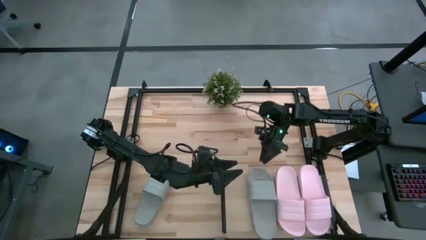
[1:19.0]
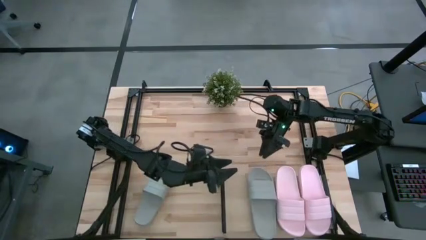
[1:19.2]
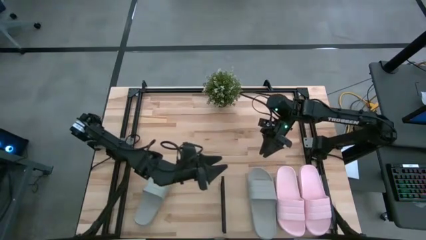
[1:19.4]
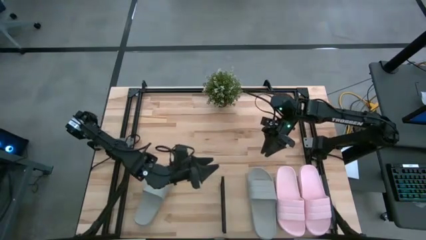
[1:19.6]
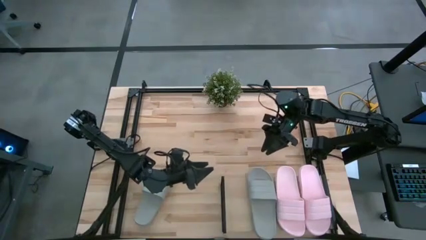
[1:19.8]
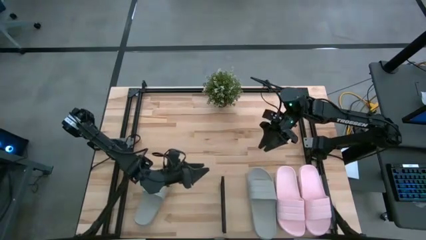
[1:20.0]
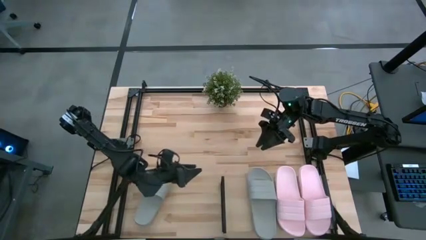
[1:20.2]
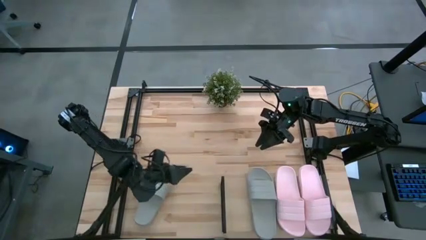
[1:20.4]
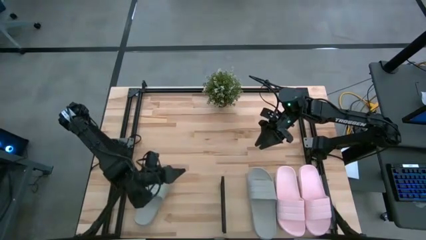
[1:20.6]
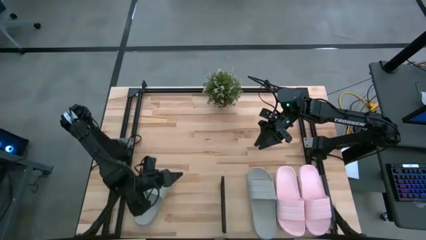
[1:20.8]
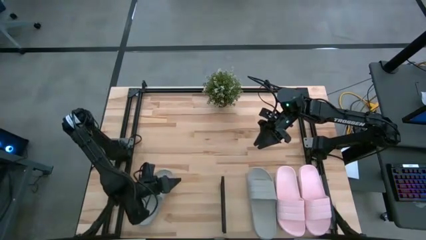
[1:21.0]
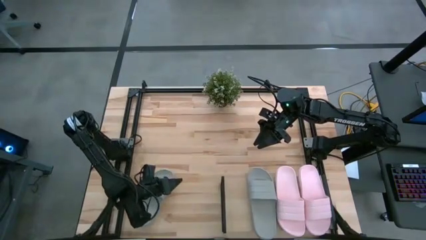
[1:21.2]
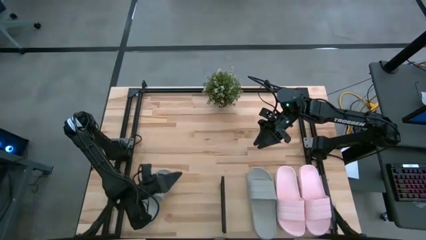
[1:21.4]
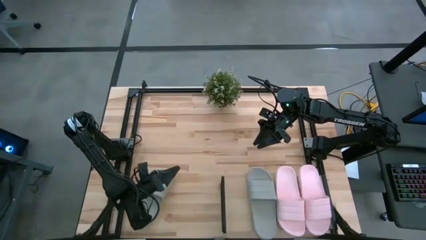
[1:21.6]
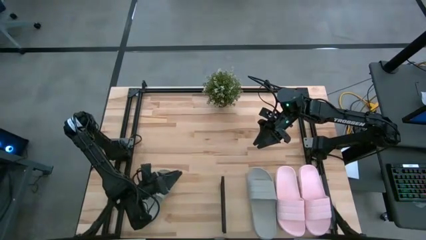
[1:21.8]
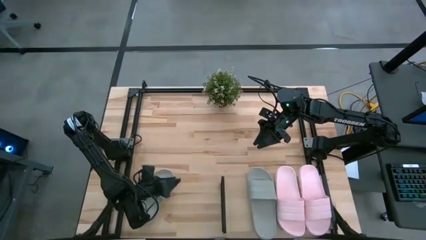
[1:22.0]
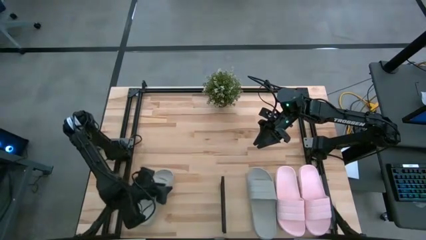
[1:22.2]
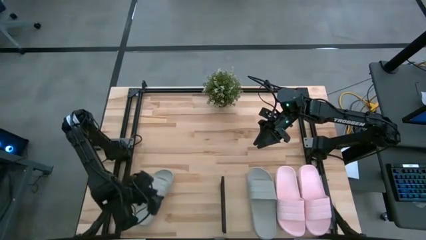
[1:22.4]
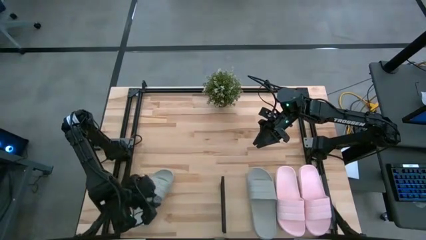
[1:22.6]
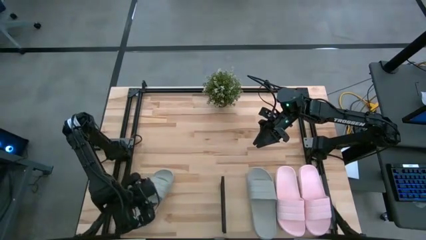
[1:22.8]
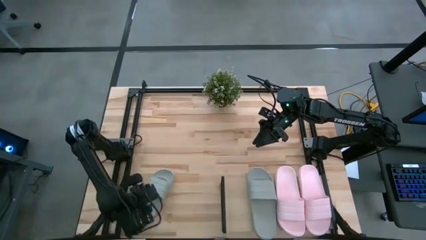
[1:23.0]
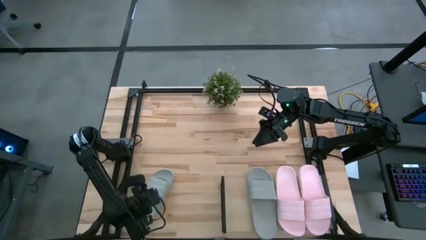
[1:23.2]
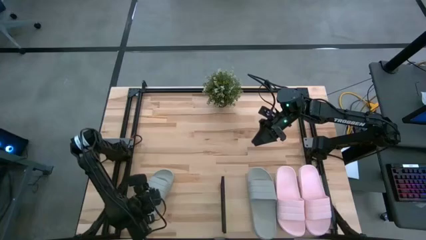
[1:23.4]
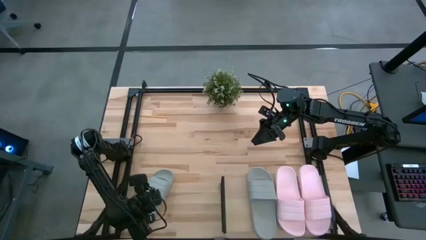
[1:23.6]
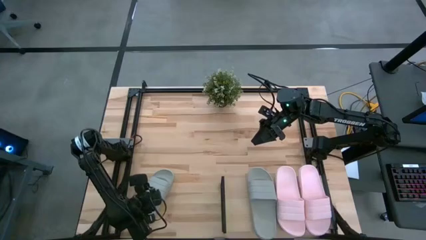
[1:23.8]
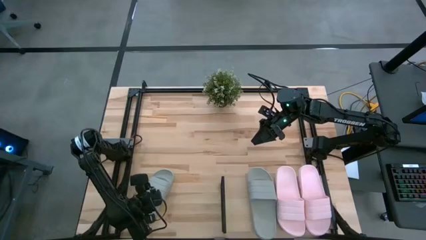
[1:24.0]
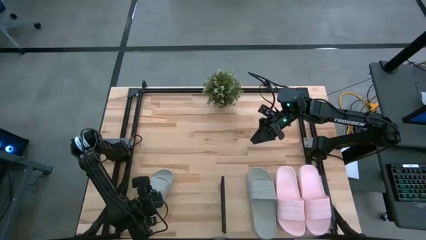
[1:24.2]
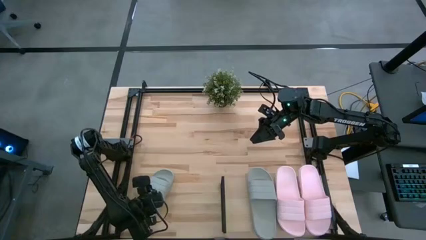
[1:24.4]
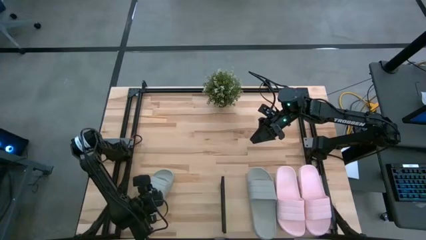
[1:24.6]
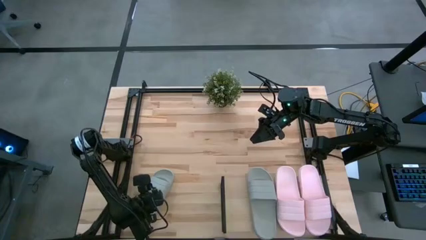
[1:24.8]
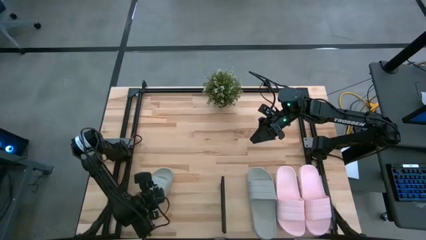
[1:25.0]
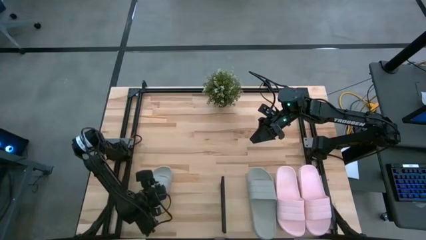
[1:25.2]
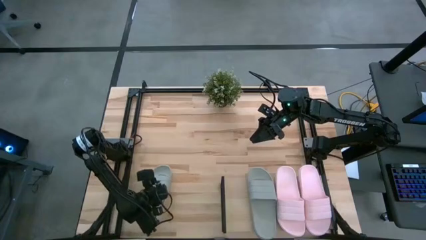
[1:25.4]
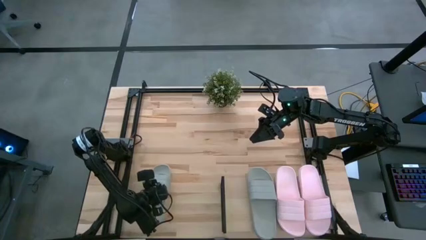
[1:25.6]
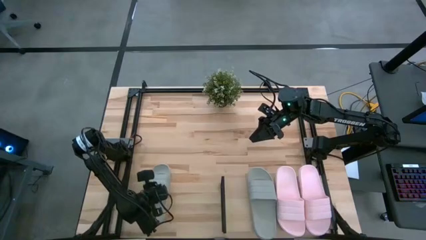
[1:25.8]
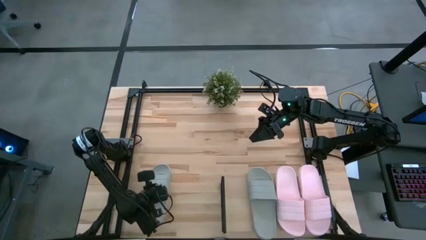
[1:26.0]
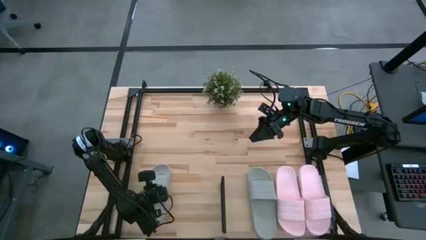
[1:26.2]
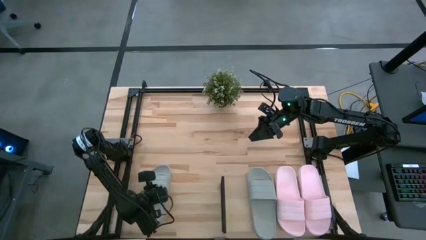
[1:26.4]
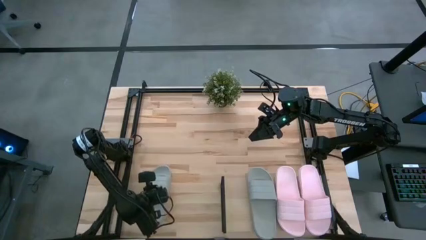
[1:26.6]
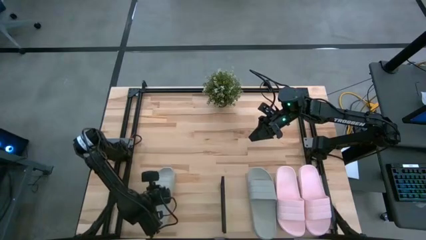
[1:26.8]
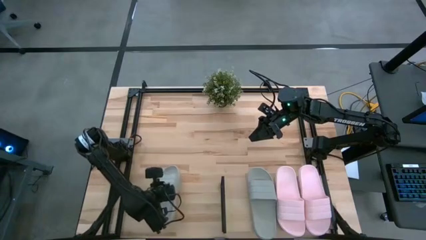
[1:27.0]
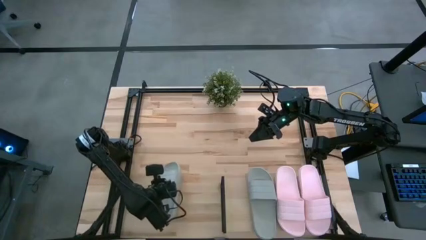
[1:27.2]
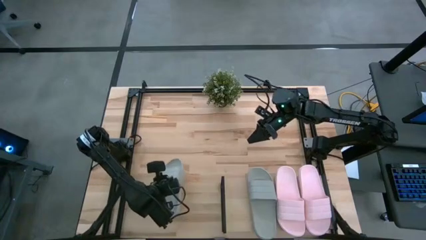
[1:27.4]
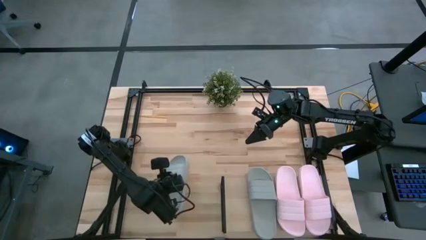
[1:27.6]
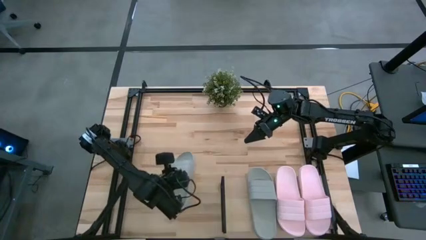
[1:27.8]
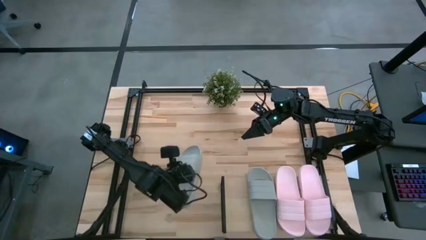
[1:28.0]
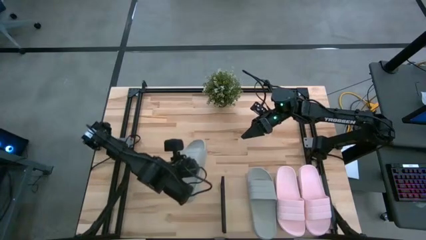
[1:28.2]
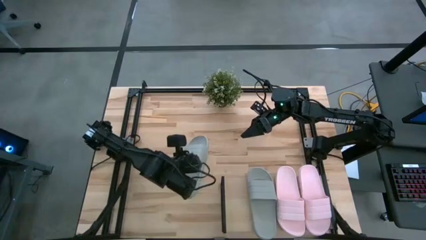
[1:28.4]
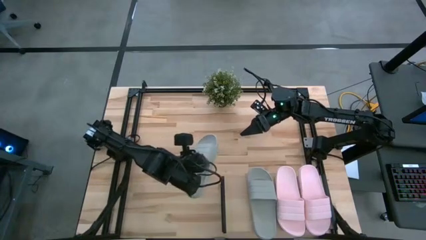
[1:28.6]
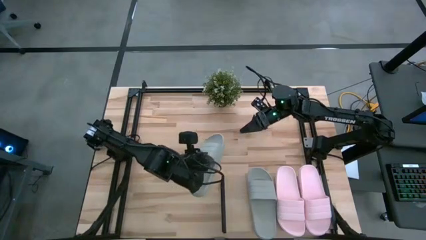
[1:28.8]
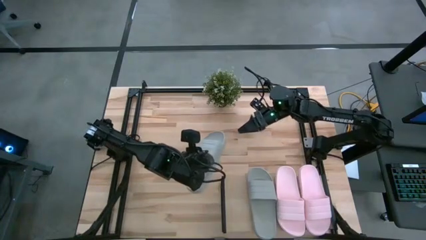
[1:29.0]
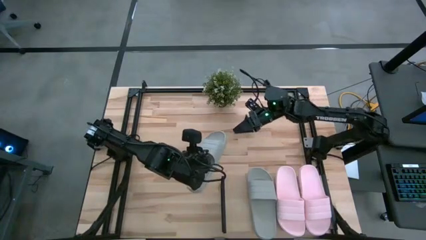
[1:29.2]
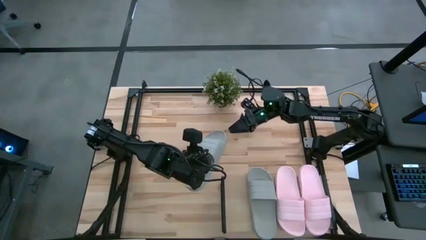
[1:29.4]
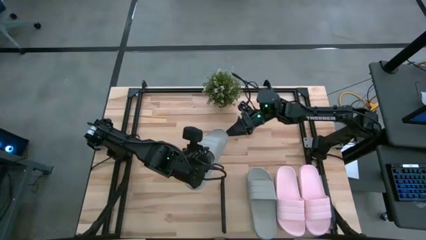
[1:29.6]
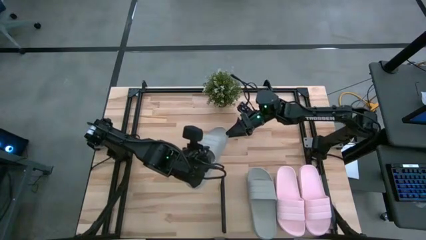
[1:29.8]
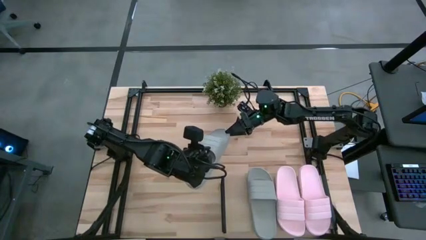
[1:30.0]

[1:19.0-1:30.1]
Task: Pick and place slides into the shelf
Put the gray slide on the shelf

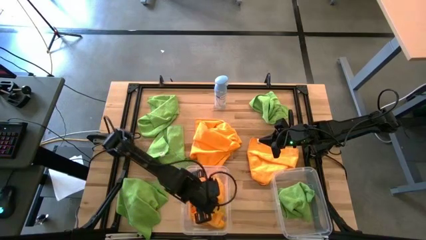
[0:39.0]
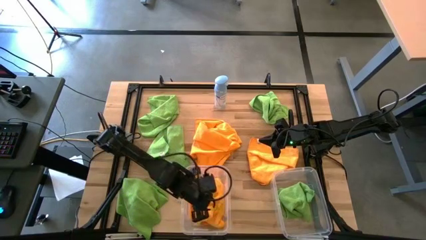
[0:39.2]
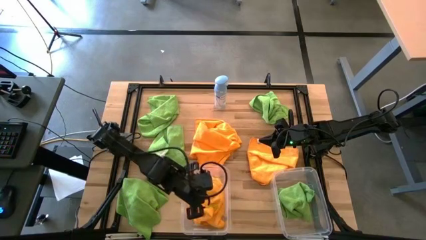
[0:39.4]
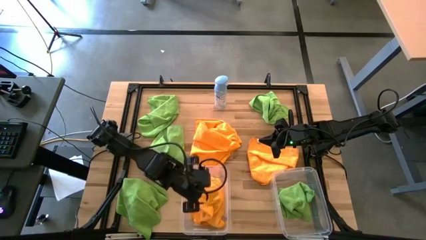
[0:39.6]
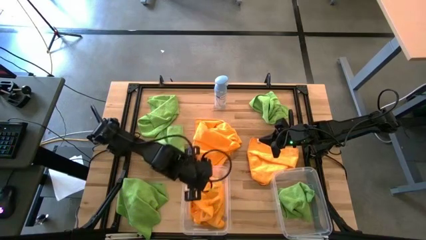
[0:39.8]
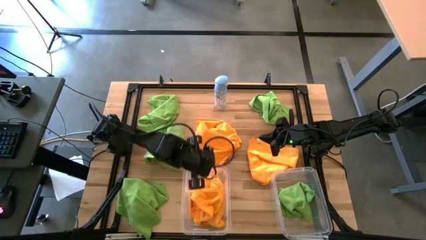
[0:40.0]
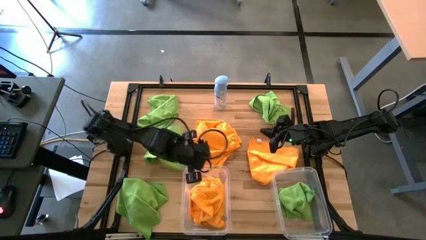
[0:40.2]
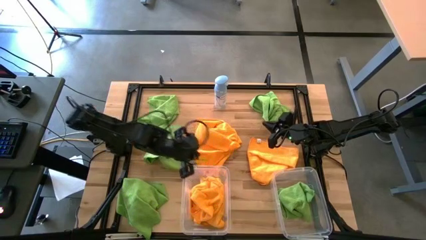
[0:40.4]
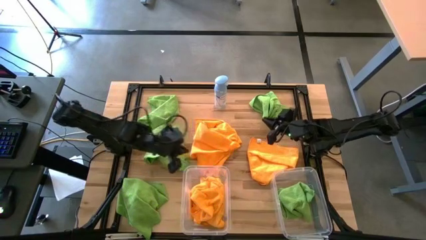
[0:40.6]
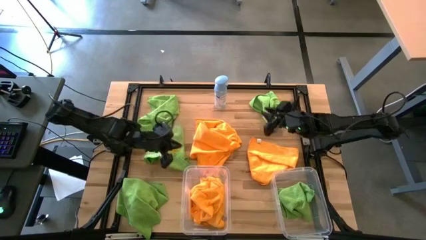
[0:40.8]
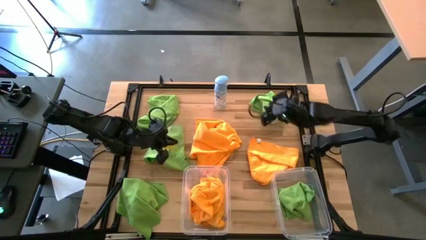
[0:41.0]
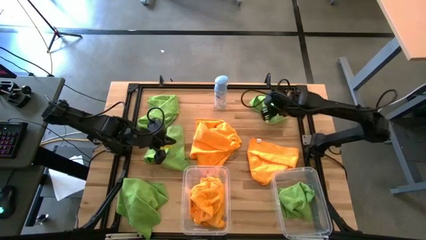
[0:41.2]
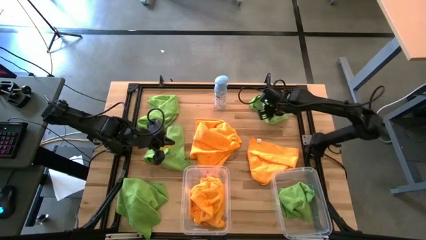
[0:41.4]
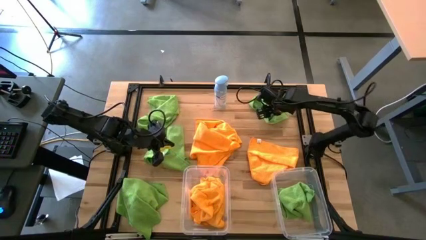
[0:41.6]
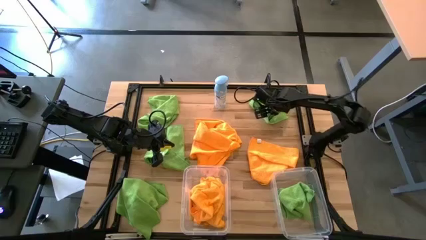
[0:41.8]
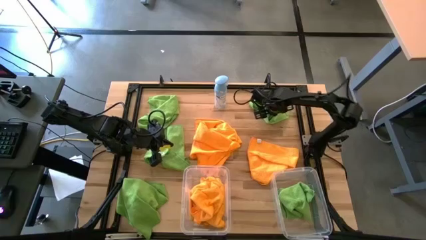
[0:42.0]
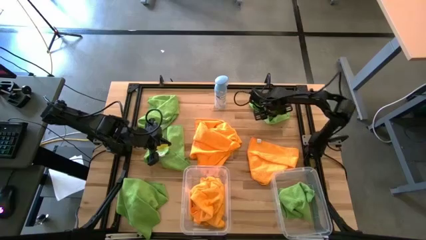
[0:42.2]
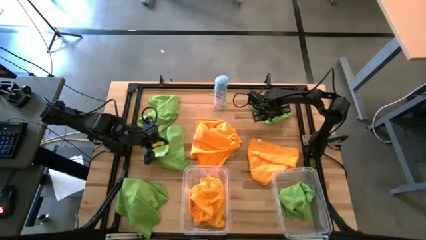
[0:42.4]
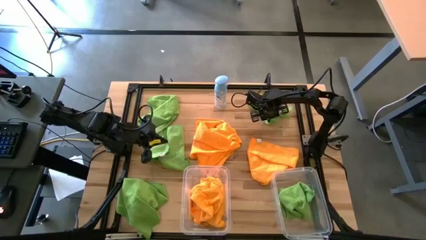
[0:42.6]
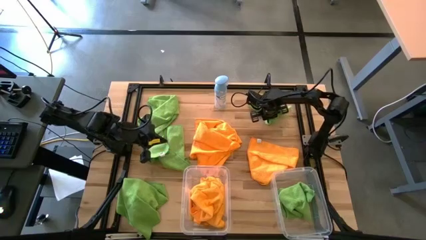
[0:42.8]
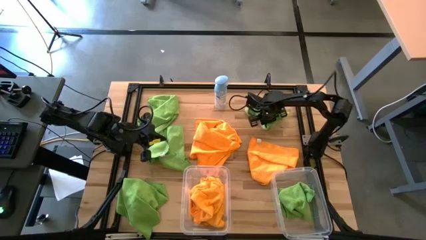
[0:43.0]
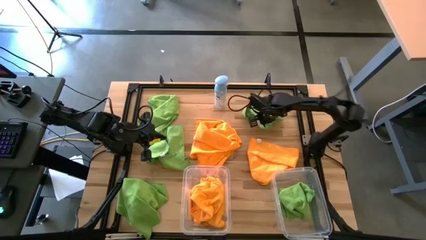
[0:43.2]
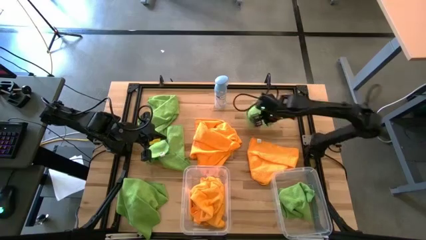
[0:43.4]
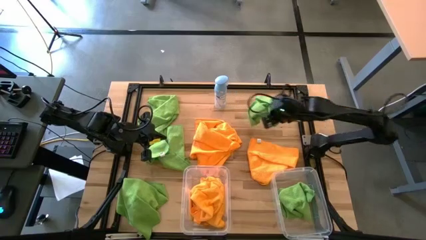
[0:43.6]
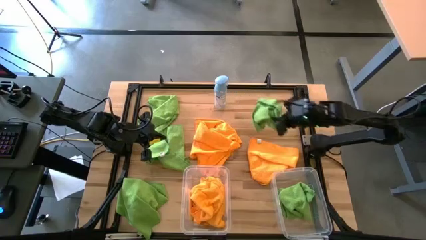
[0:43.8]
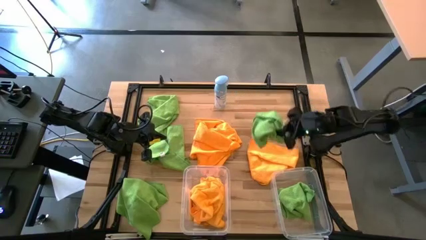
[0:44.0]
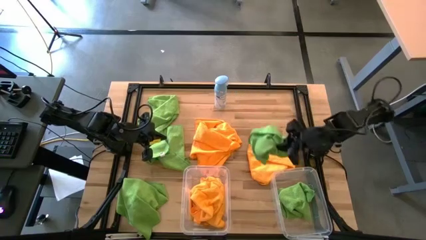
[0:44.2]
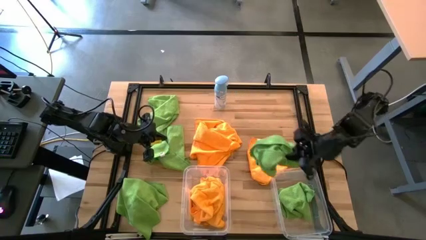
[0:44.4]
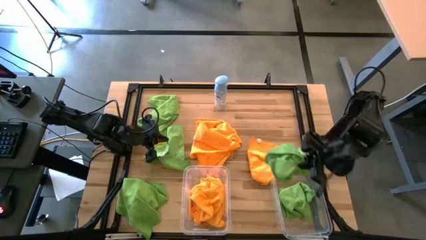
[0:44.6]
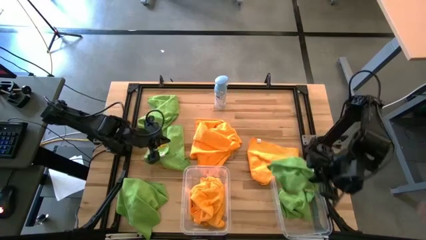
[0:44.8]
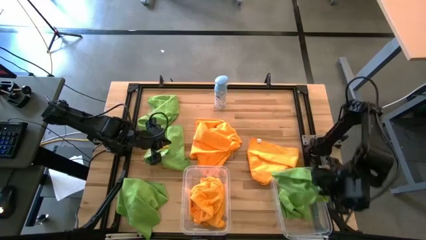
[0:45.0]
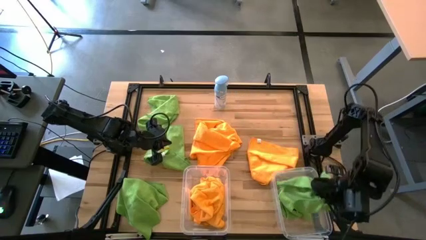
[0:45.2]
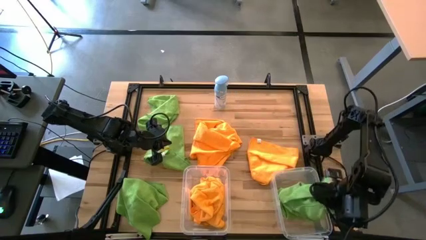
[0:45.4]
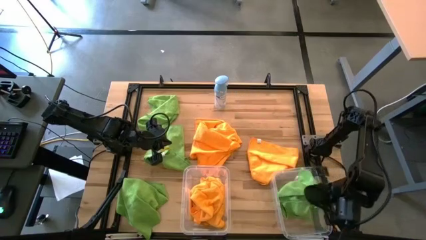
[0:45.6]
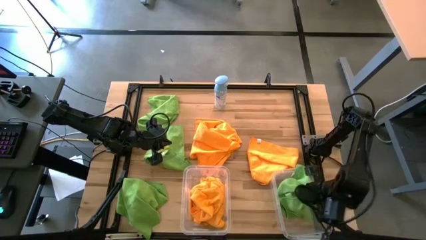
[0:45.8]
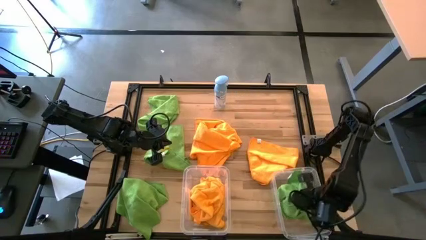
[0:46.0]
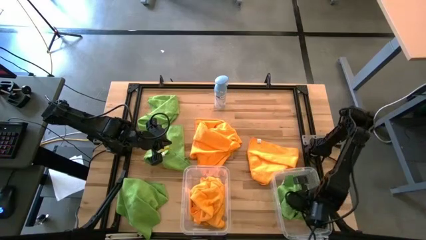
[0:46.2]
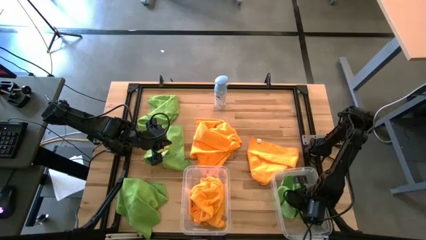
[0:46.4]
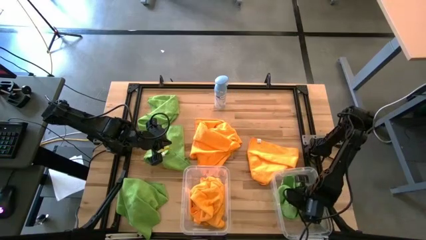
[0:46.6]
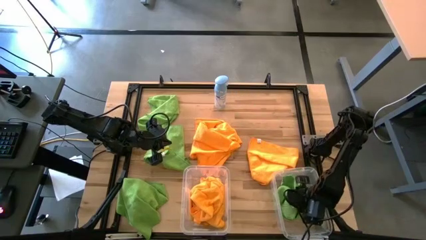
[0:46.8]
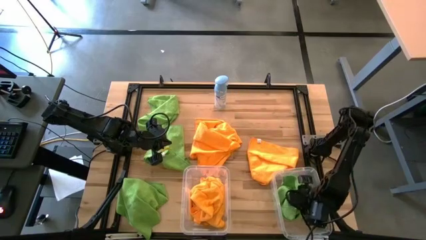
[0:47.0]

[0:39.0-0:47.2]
Task: Sort microfiber towel by color & place in baskets
Put the green towel into the right transparent bin
